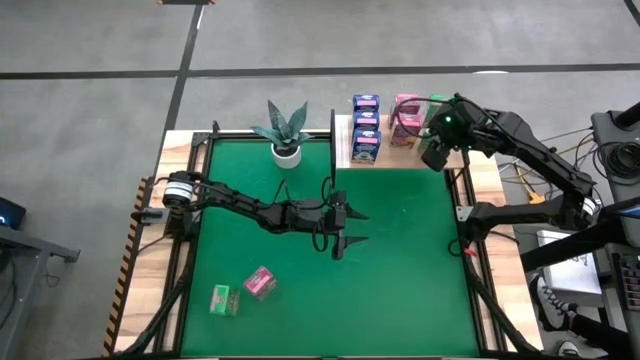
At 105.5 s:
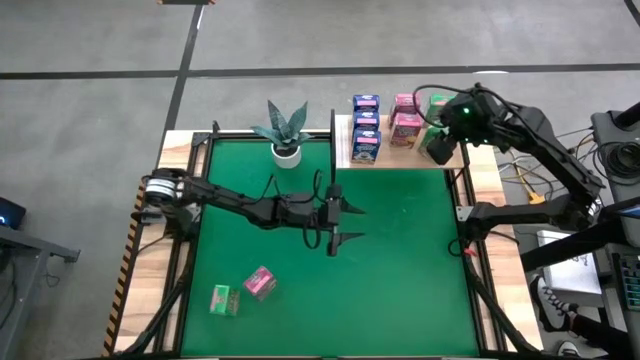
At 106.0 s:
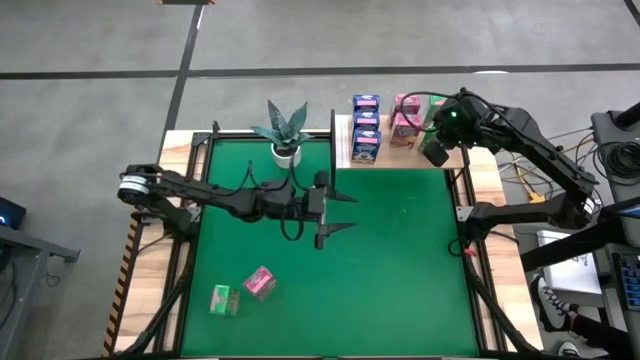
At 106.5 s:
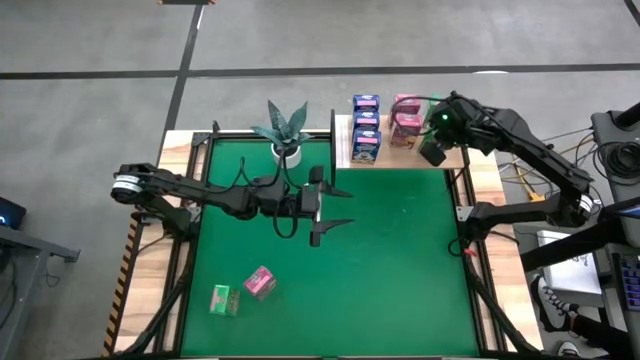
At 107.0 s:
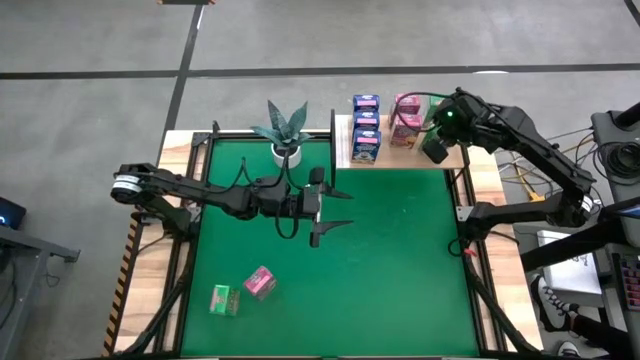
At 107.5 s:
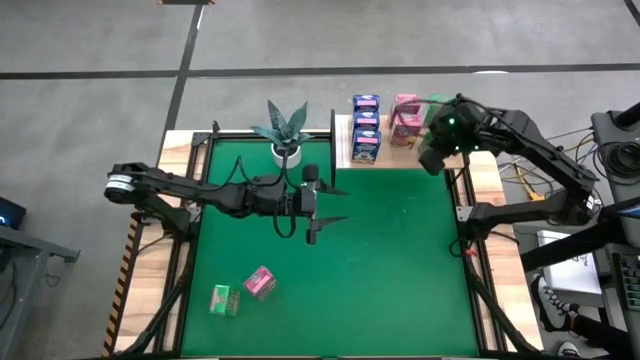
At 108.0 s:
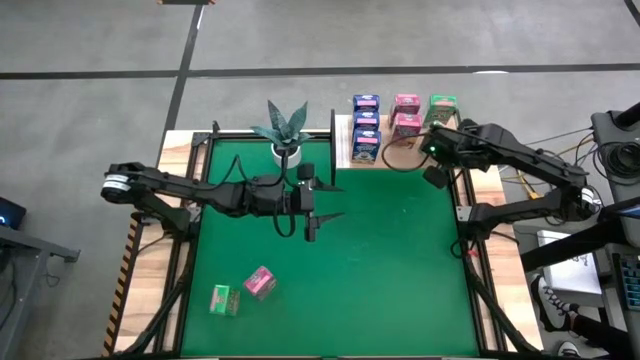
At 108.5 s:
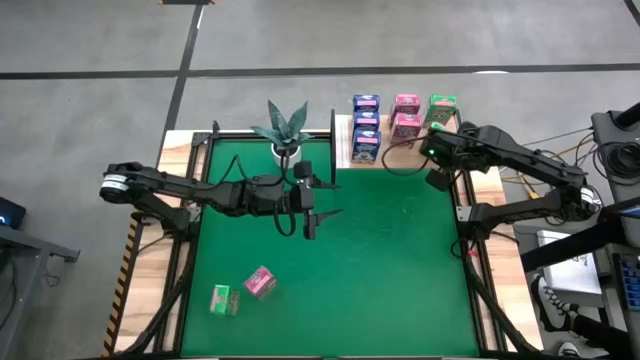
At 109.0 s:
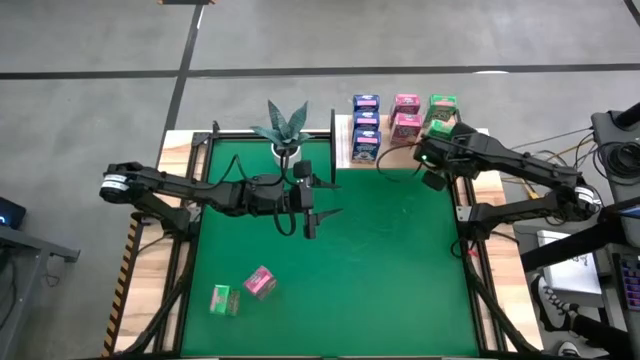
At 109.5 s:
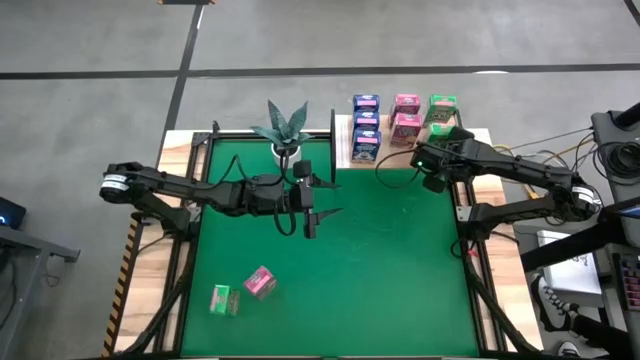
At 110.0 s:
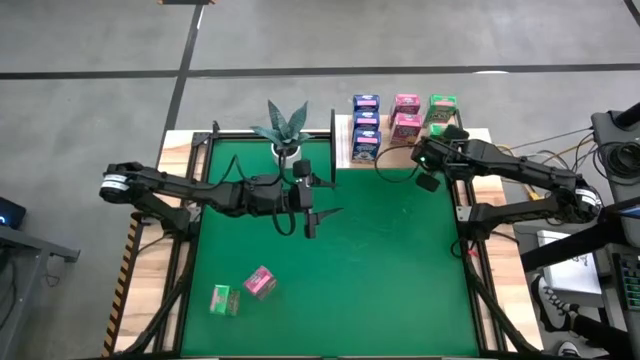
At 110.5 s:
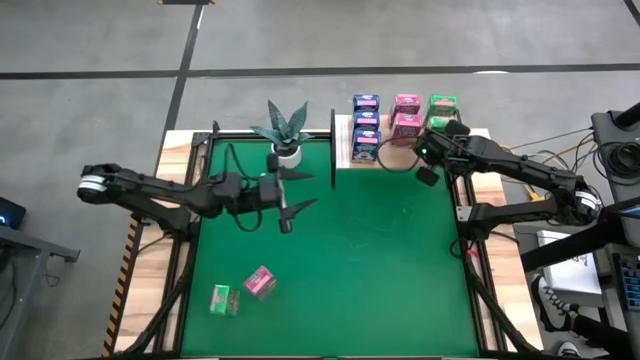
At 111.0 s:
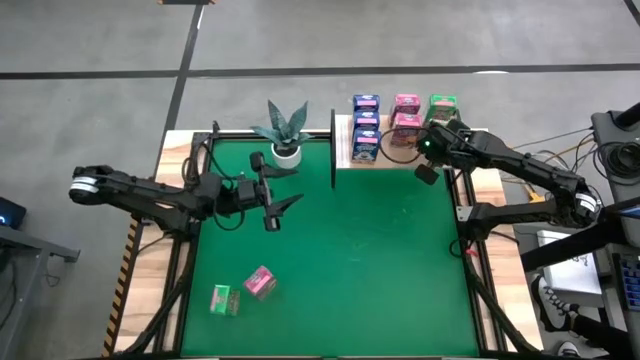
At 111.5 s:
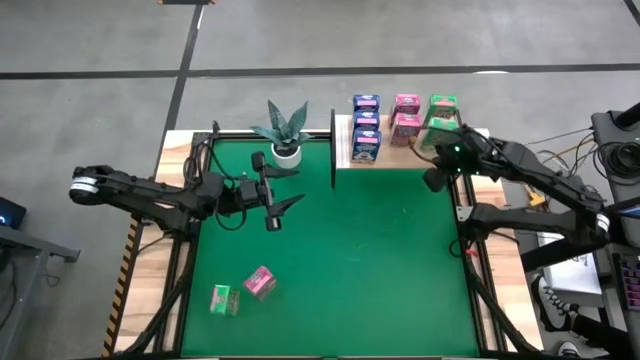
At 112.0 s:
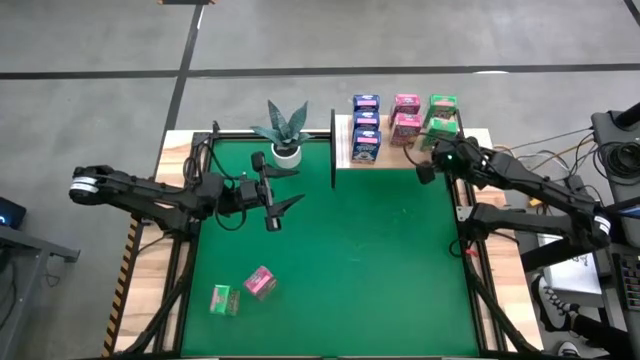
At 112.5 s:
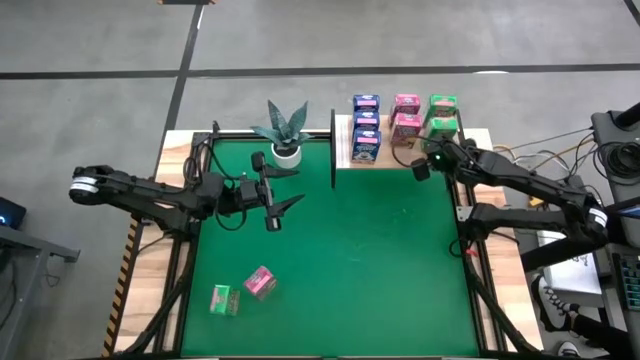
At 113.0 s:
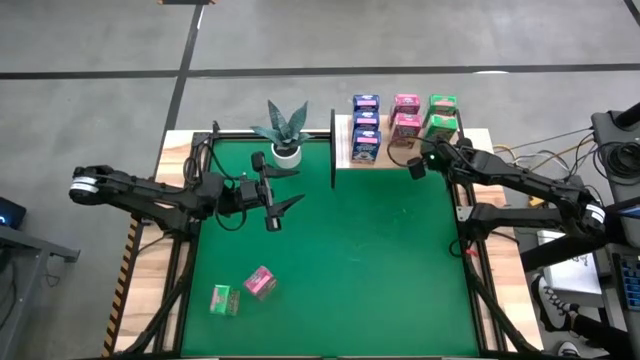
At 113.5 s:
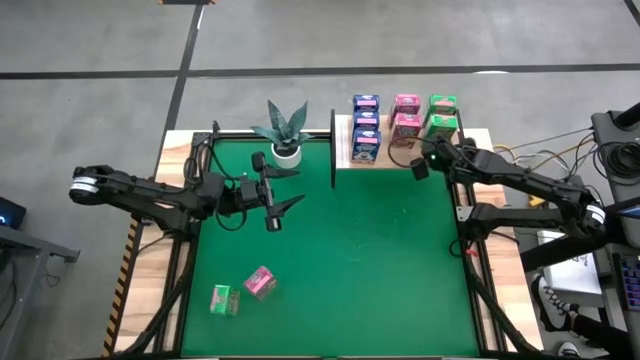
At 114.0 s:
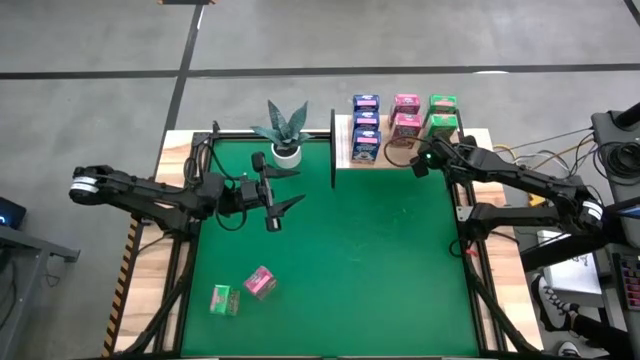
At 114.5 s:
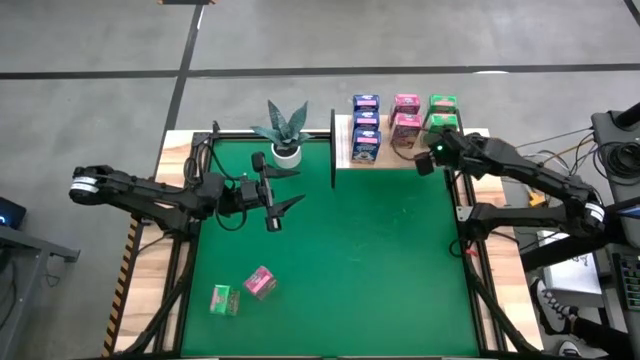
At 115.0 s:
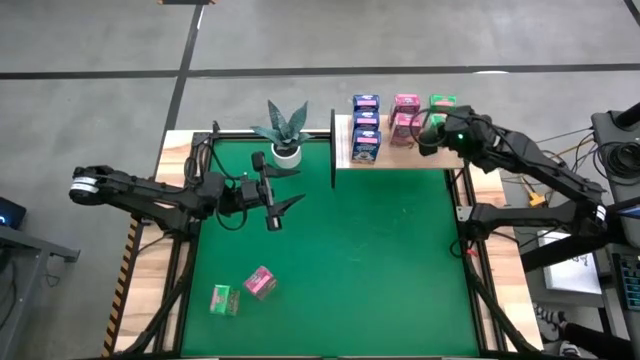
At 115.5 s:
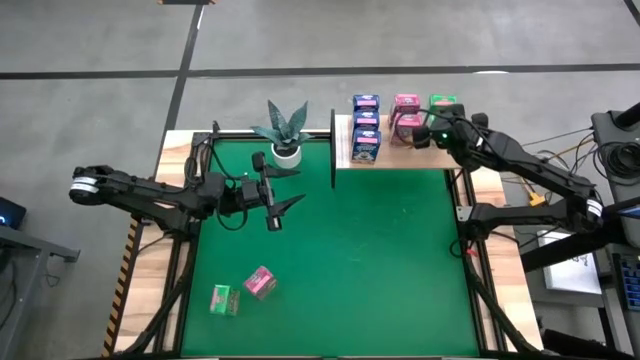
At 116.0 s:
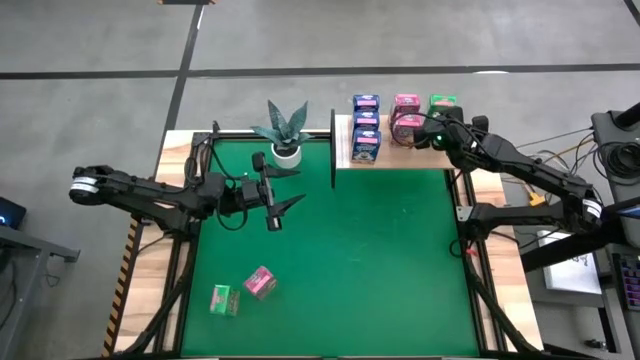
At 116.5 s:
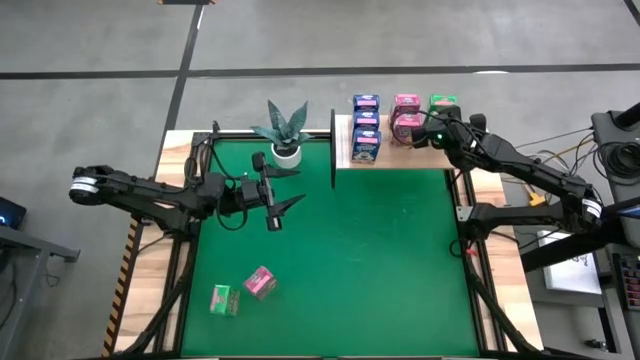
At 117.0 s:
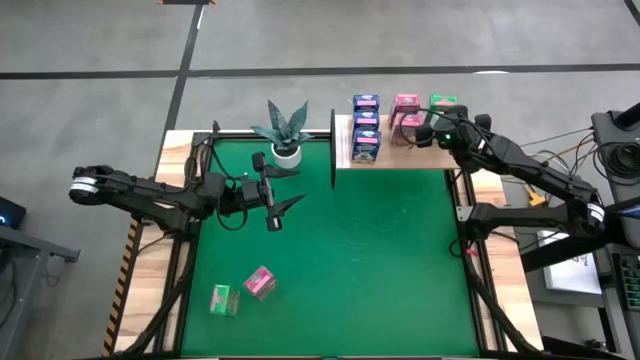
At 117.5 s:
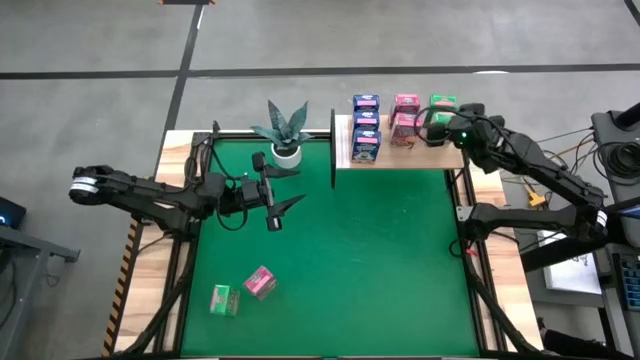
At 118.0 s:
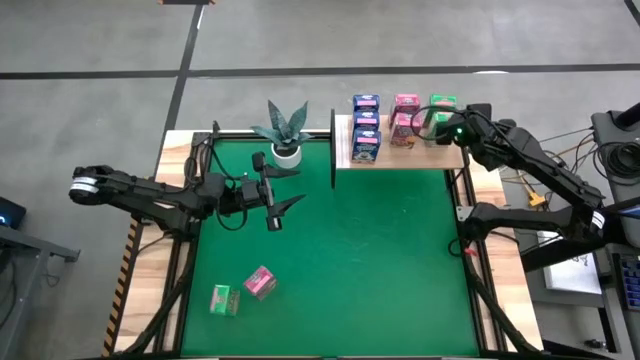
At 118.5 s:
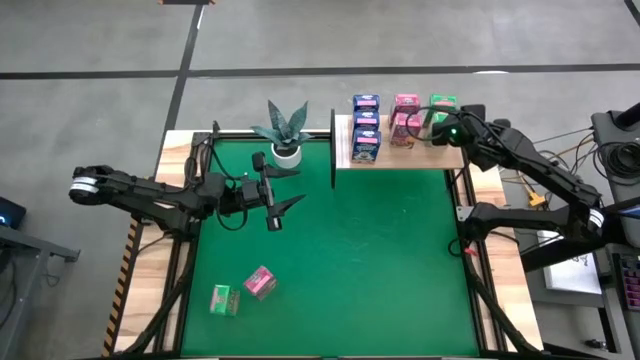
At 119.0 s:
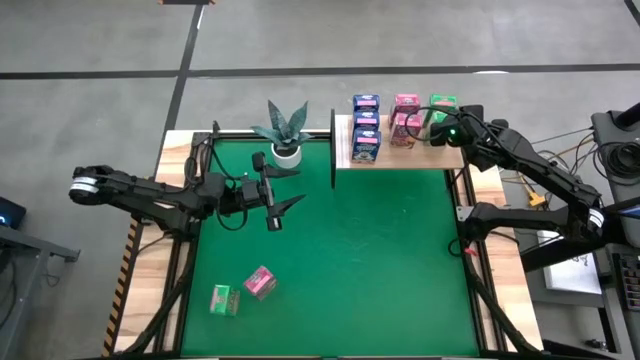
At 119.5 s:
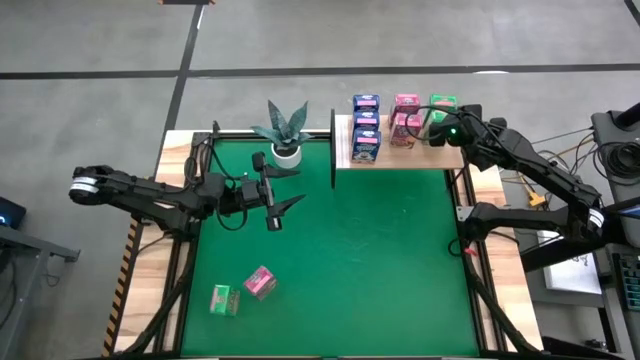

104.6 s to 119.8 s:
Task: Stack cereal on shelf
Put the top green cereal box on the shelf aligned with the other green cereal boxes

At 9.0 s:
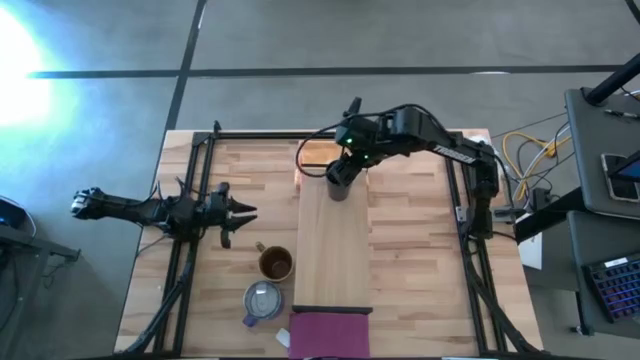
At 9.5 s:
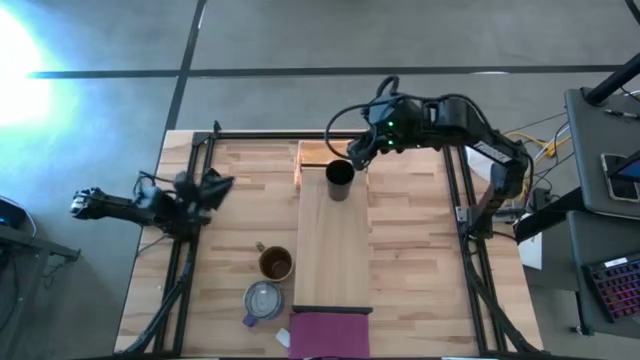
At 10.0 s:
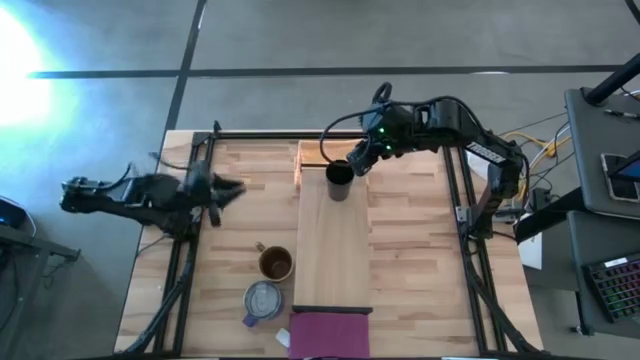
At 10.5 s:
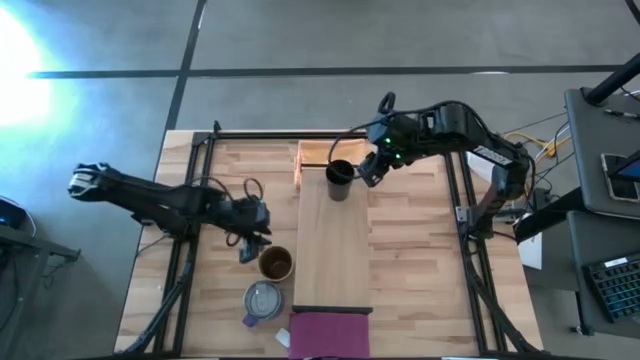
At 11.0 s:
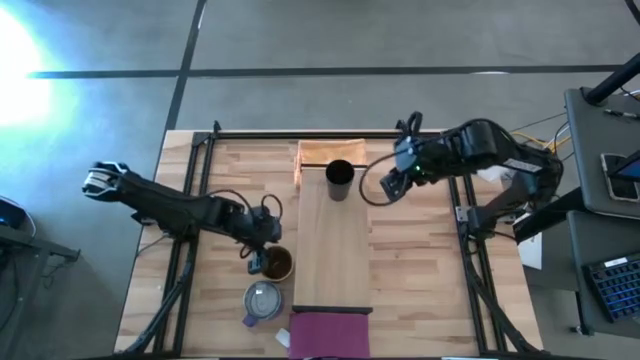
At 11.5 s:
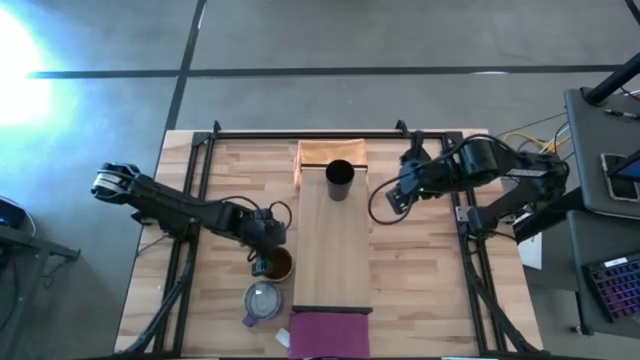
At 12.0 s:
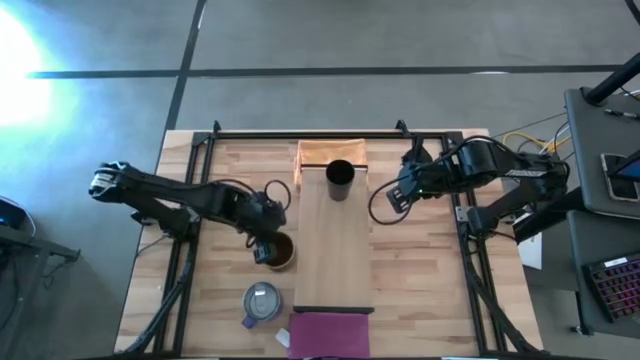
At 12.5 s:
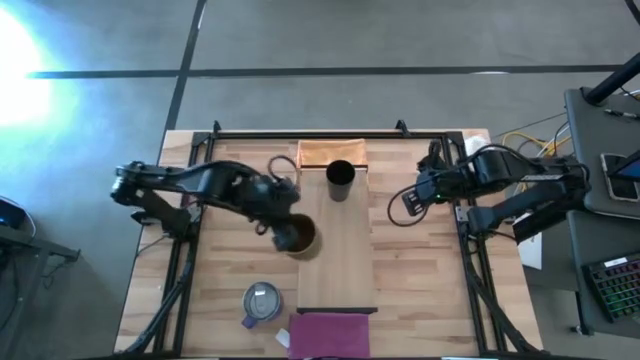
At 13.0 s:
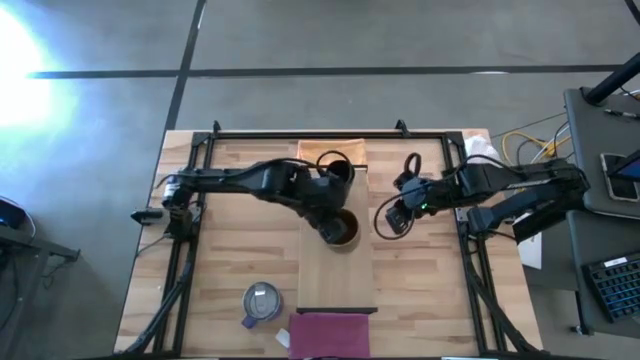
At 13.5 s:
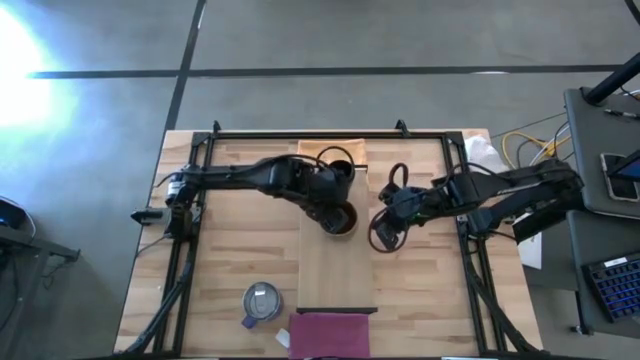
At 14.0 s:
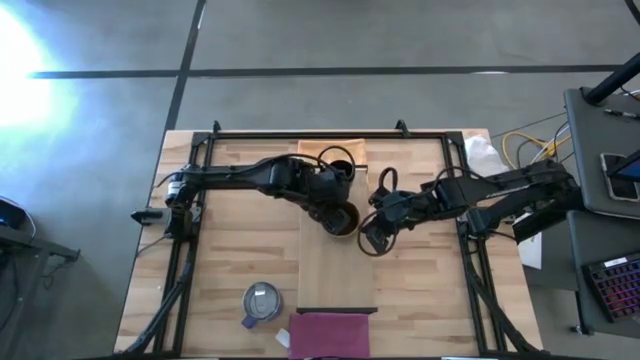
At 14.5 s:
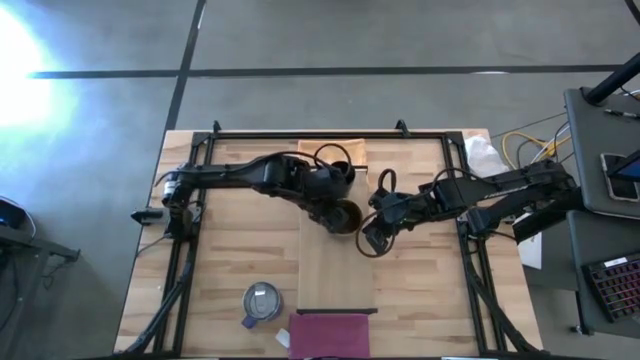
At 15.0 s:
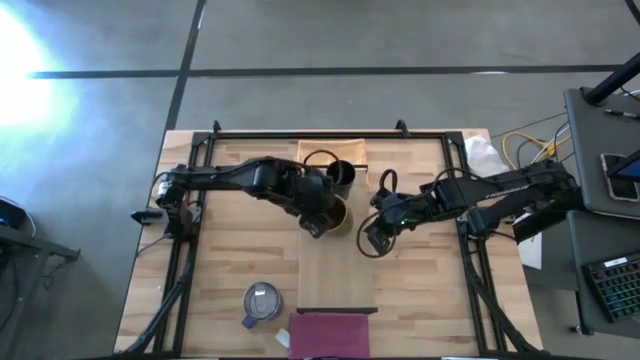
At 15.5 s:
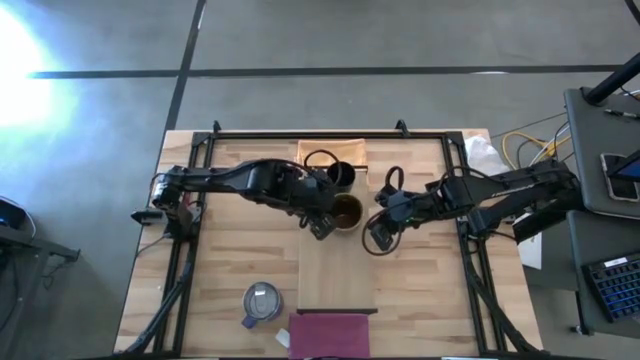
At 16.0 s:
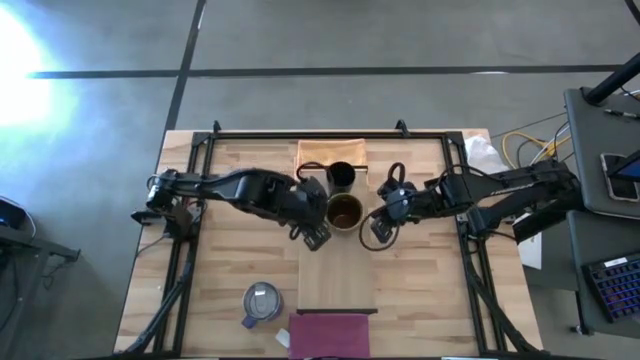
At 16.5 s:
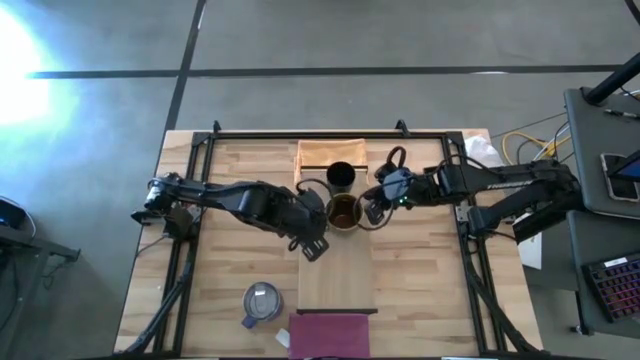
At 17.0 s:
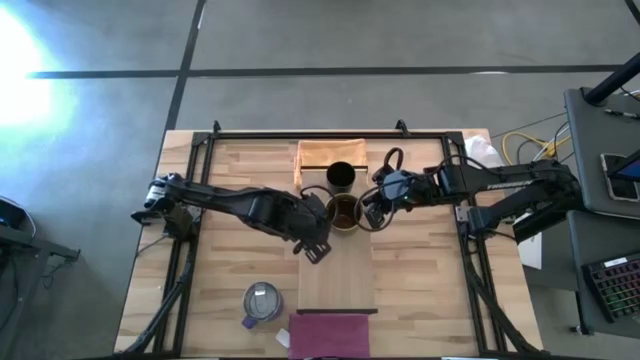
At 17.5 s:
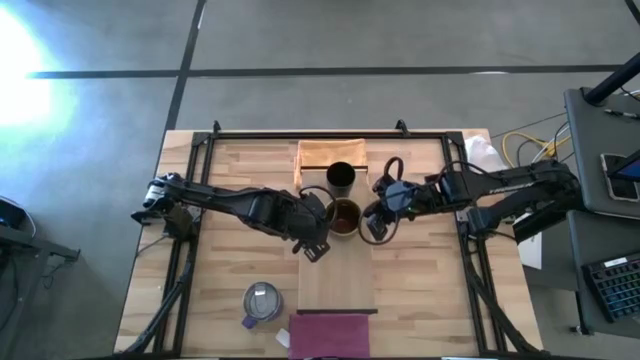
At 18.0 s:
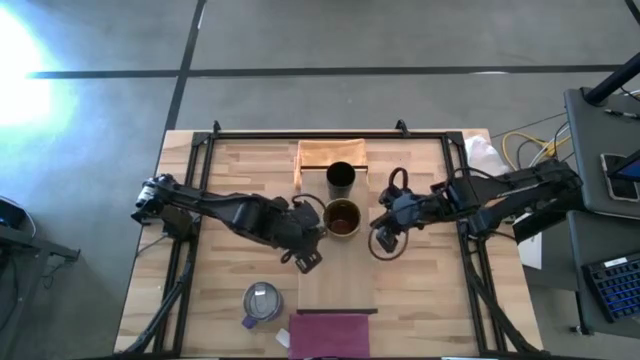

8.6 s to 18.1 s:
Task: Stack small to large cups/mugs on shelf
Put the green mug on the shelf
